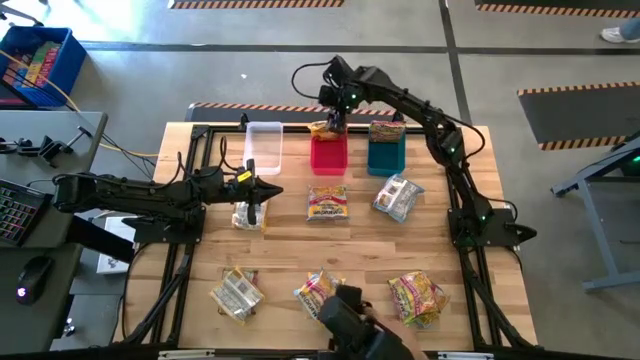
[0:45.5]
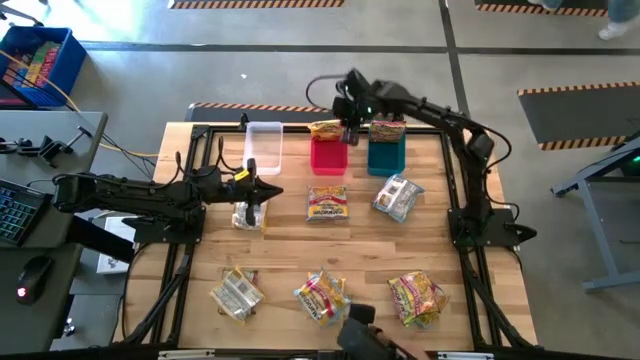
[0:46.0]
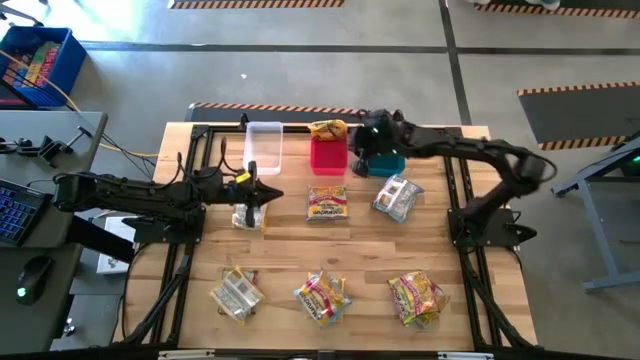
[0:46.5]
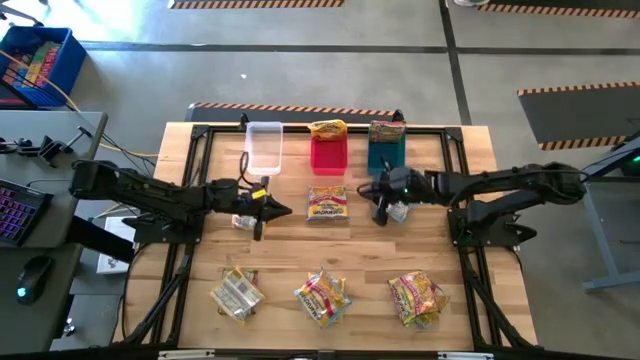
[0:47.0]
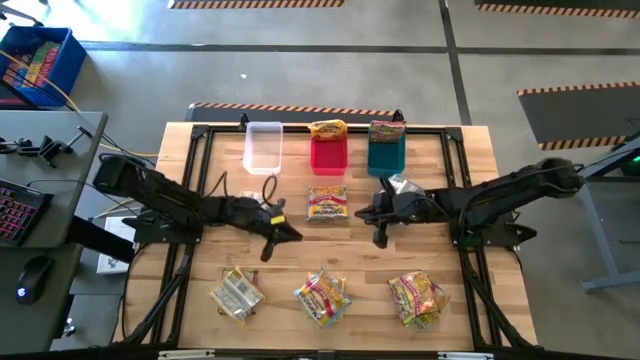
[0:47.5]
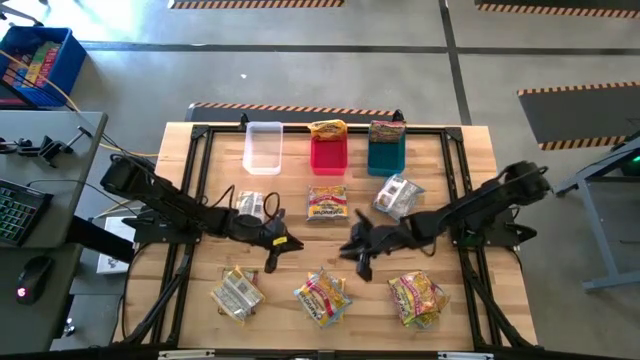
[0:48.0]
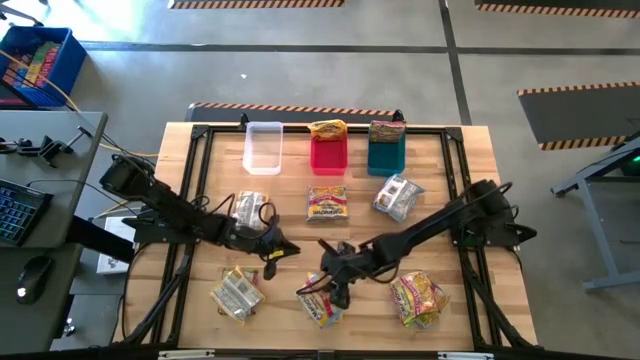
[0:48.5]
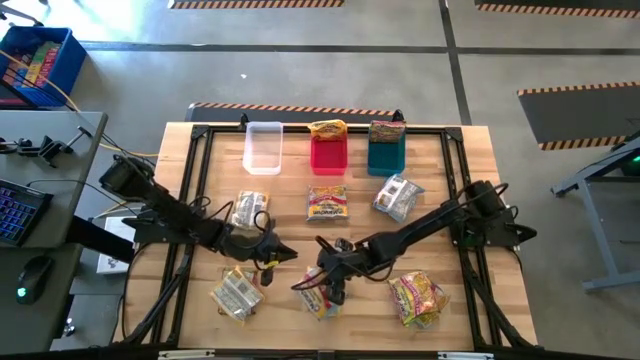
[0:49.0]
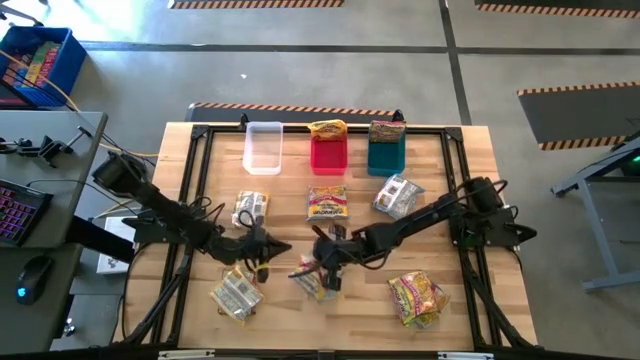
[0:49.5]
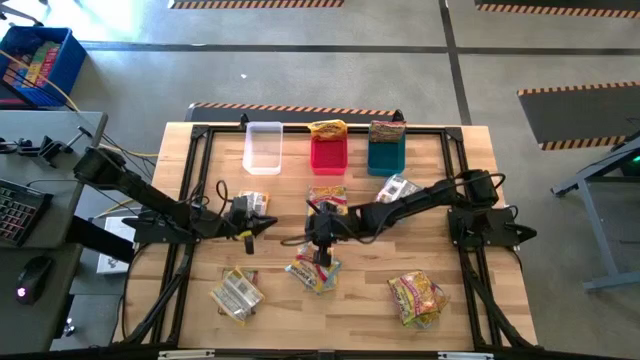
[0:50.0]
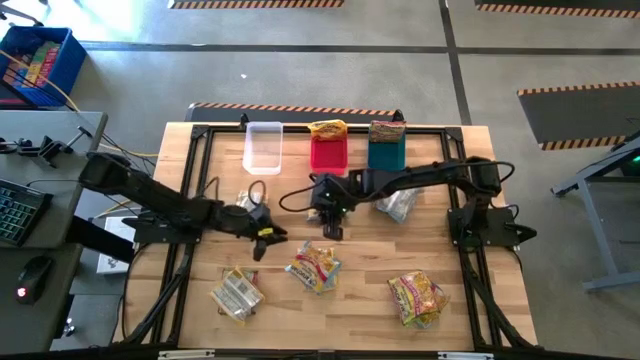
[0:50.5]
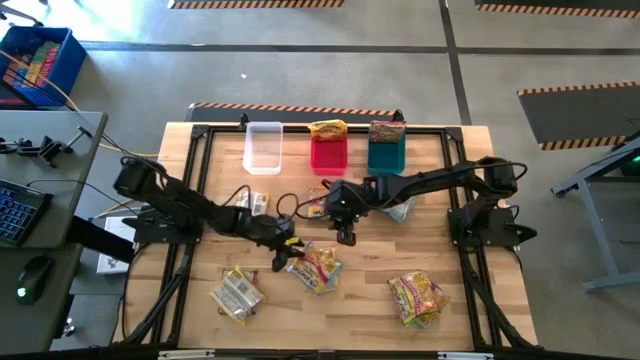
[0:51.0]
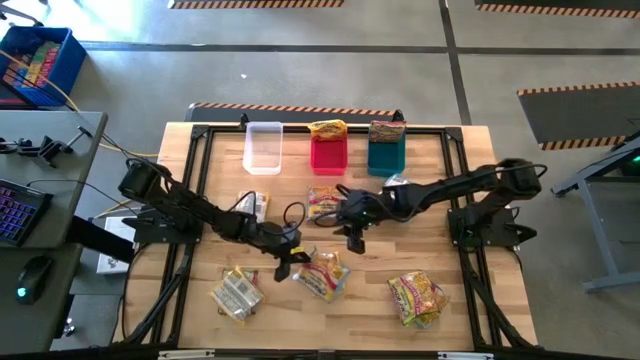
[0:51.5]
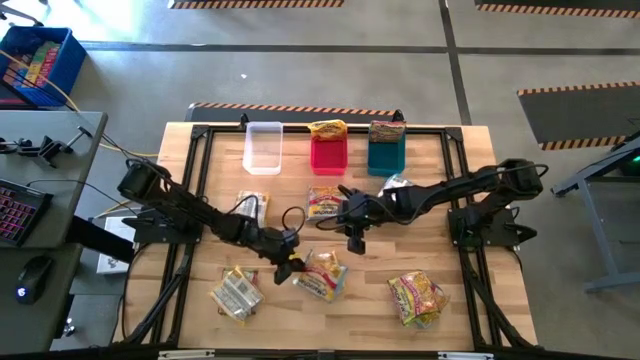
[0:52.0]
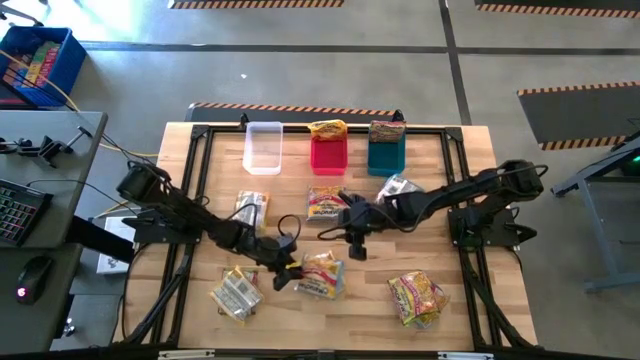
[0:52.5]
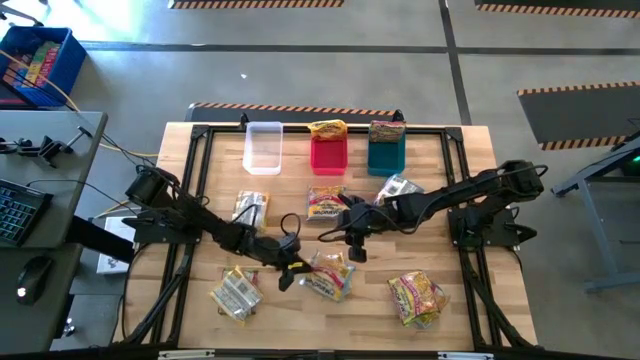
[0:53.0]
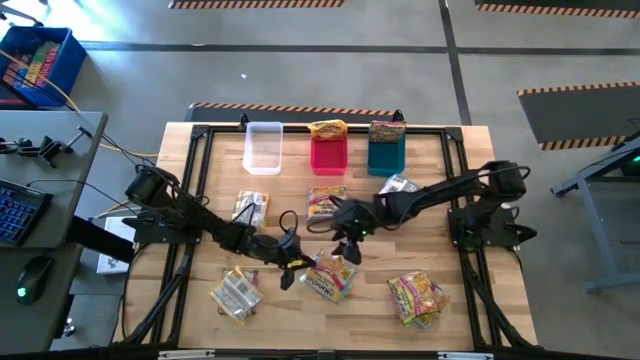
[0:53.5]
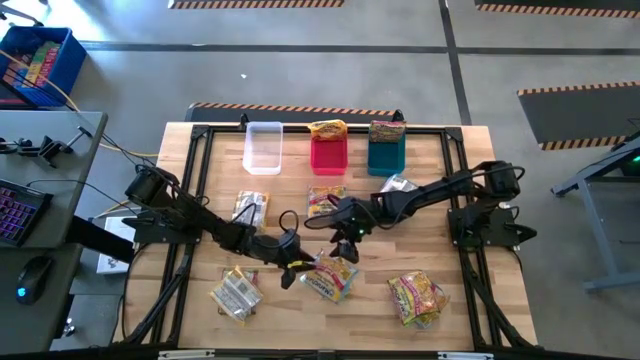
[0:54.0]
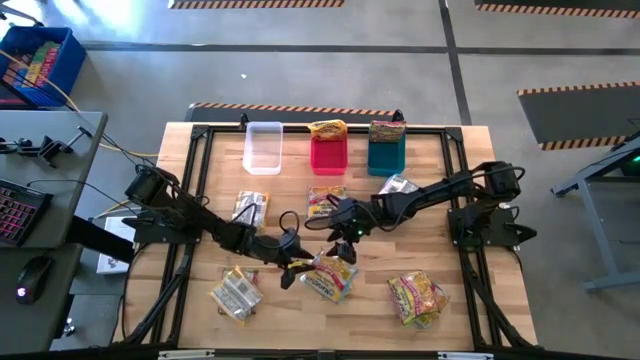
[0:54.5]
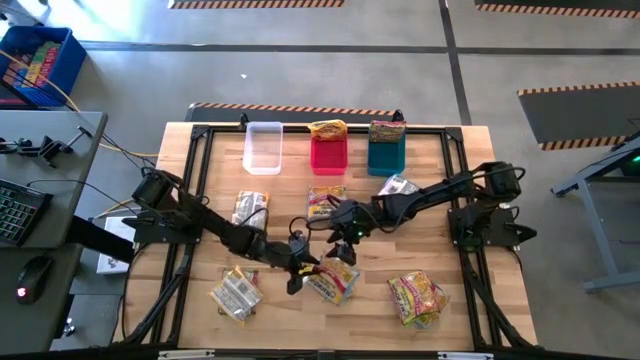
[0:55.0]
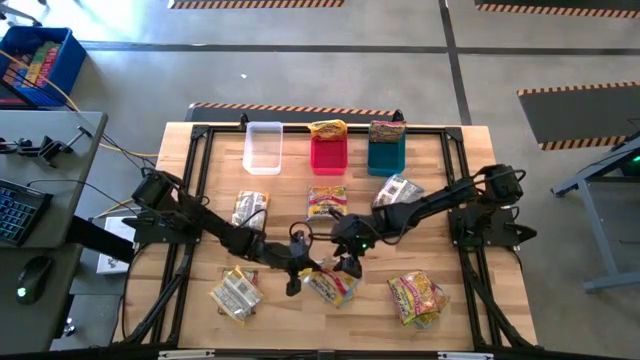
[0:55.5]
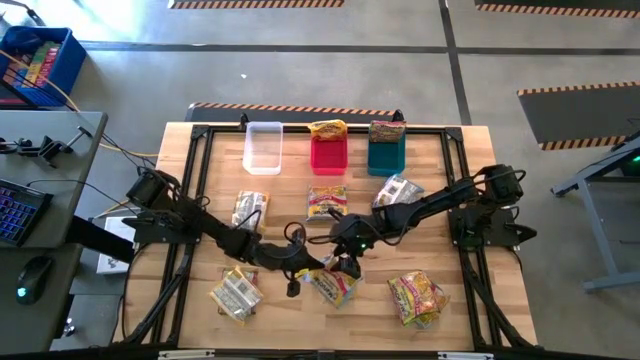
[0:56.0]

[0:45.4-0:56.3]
Task: Sort Maruchan noodles
Put the blue noodle pack into the transparent bin

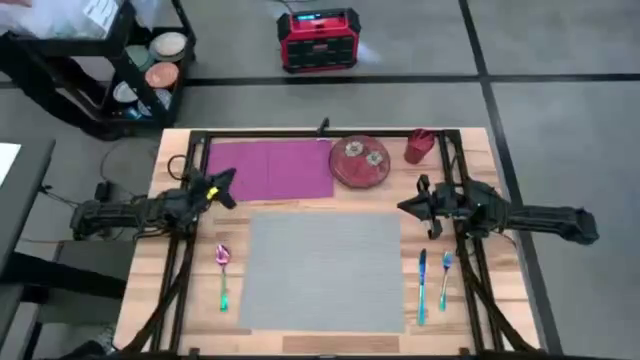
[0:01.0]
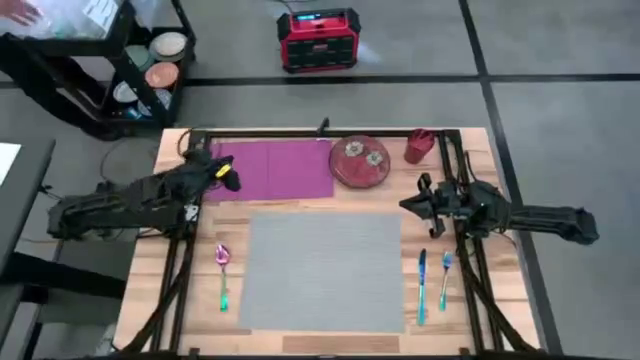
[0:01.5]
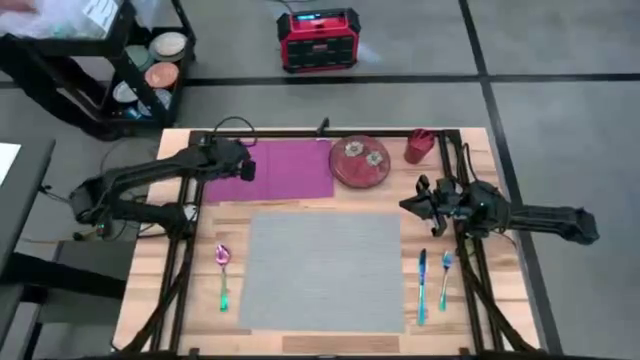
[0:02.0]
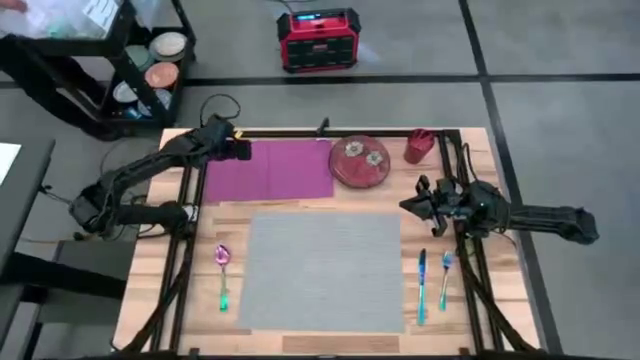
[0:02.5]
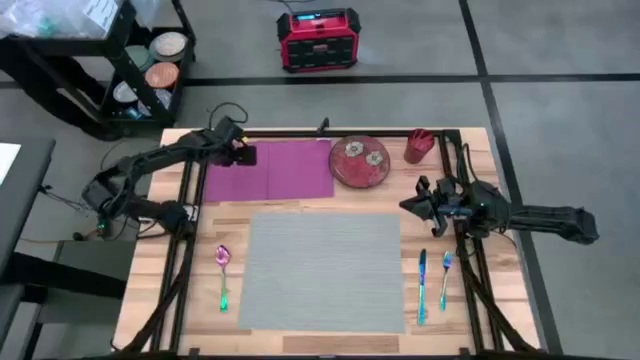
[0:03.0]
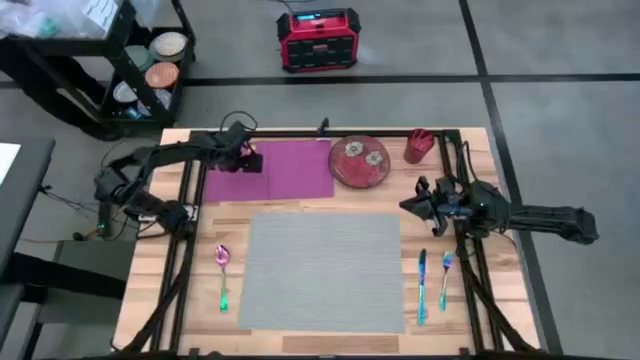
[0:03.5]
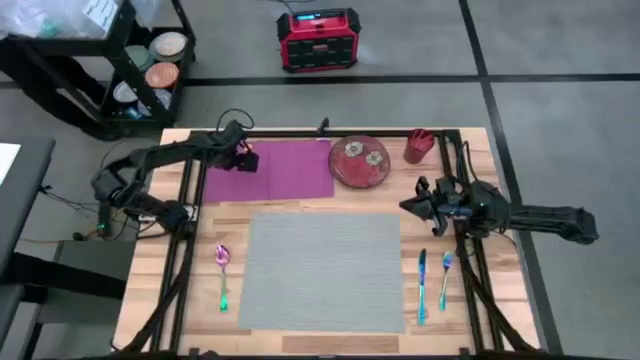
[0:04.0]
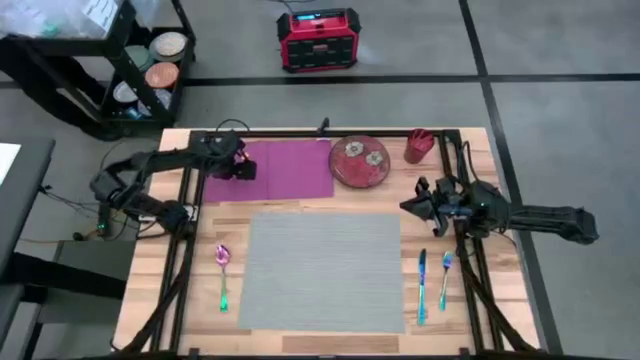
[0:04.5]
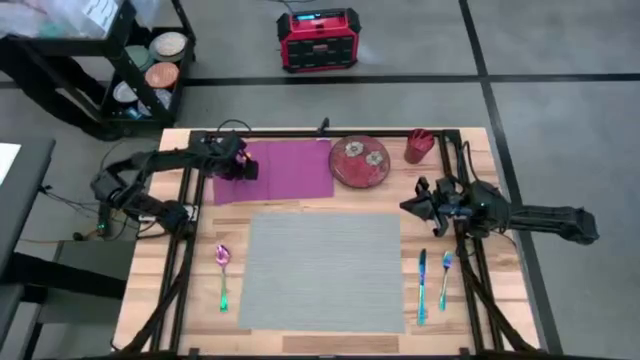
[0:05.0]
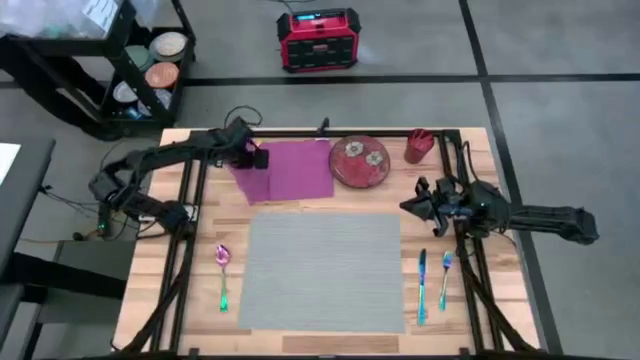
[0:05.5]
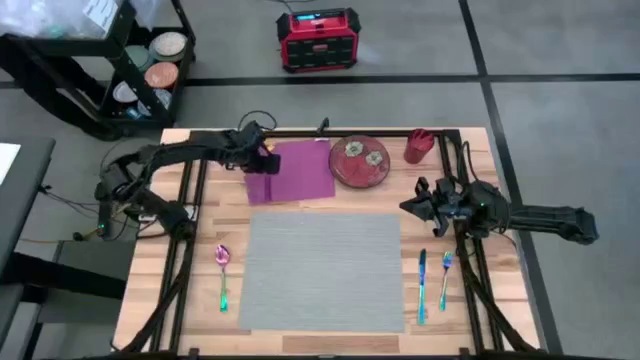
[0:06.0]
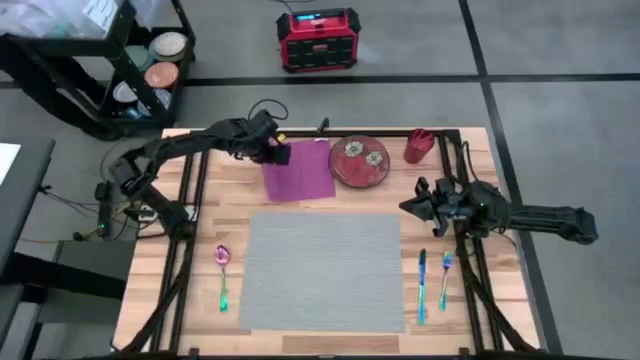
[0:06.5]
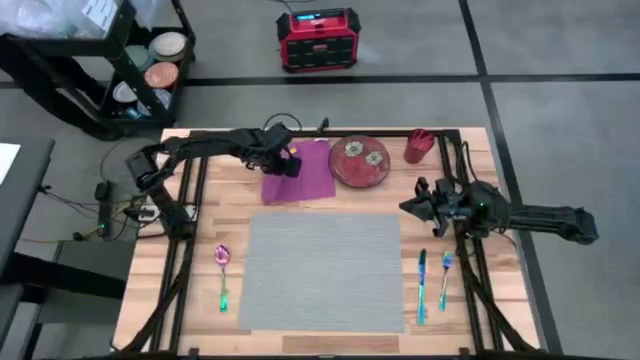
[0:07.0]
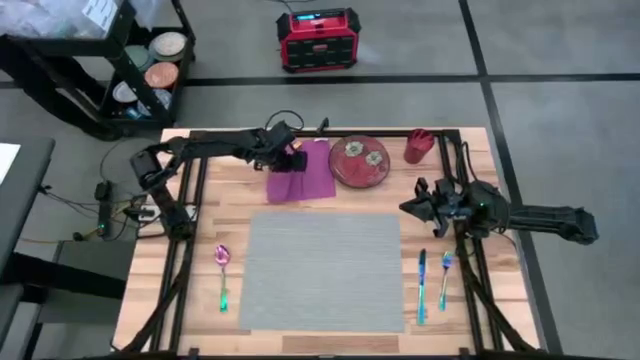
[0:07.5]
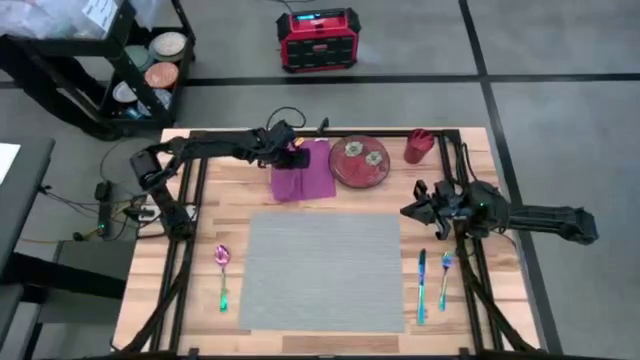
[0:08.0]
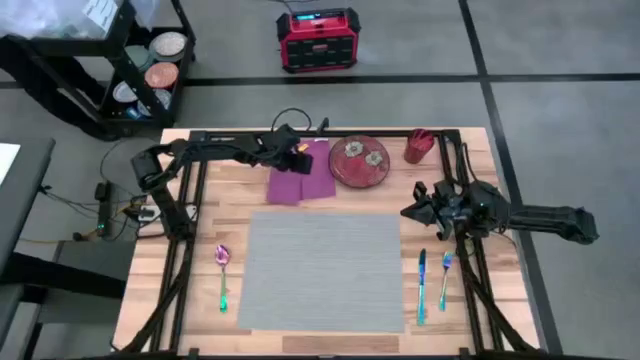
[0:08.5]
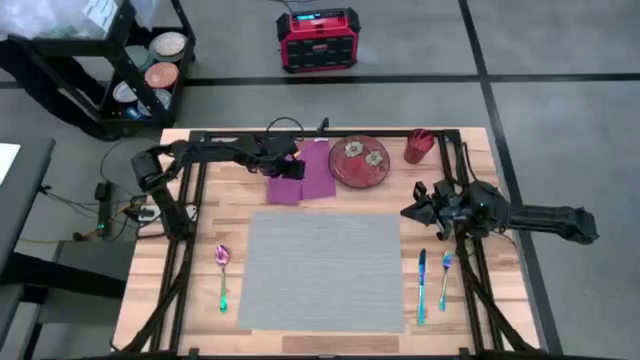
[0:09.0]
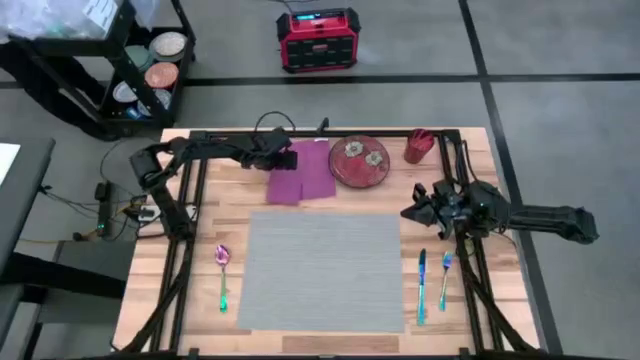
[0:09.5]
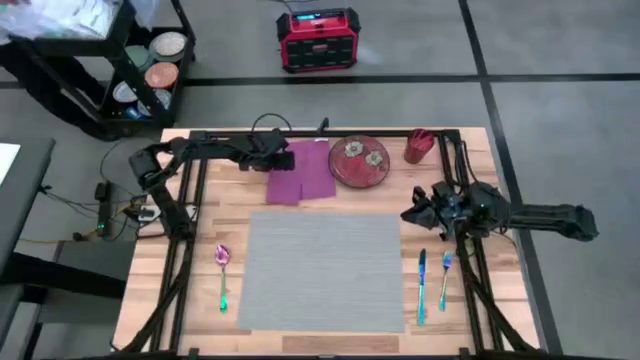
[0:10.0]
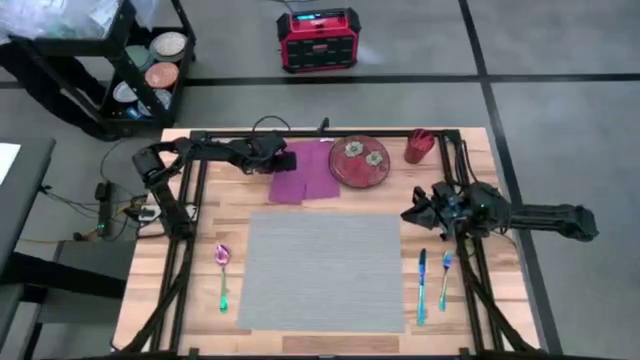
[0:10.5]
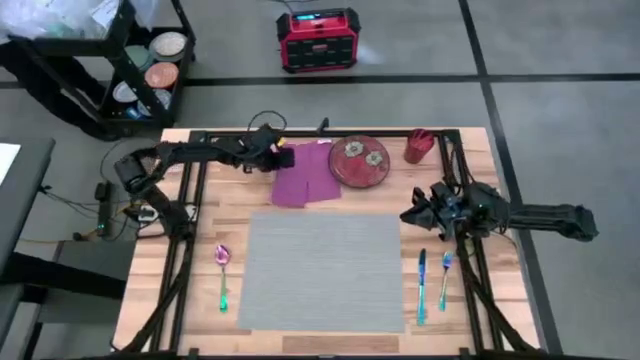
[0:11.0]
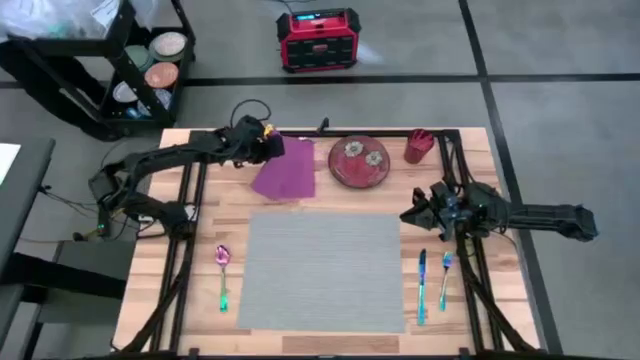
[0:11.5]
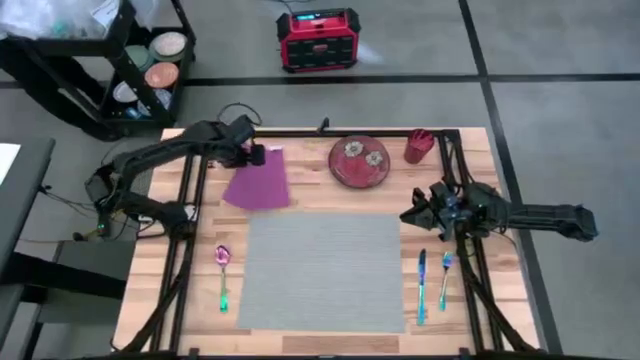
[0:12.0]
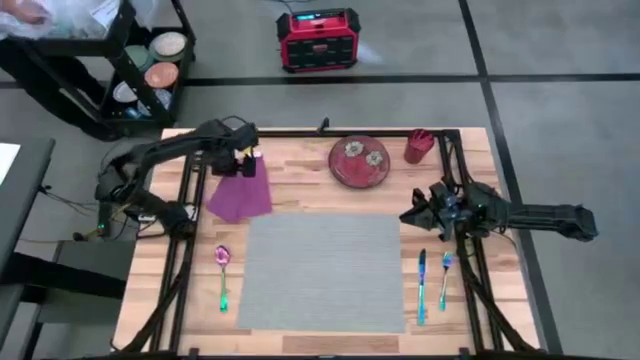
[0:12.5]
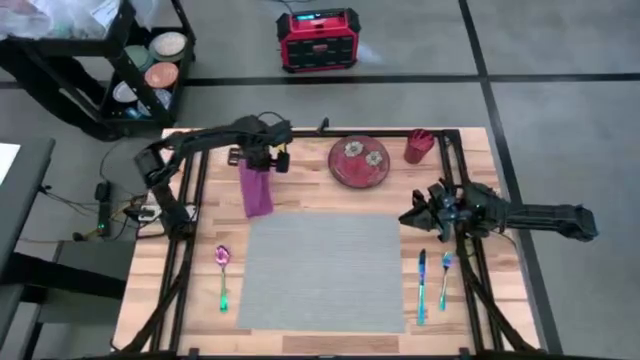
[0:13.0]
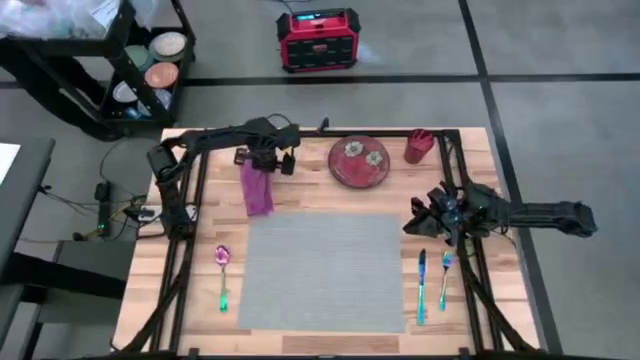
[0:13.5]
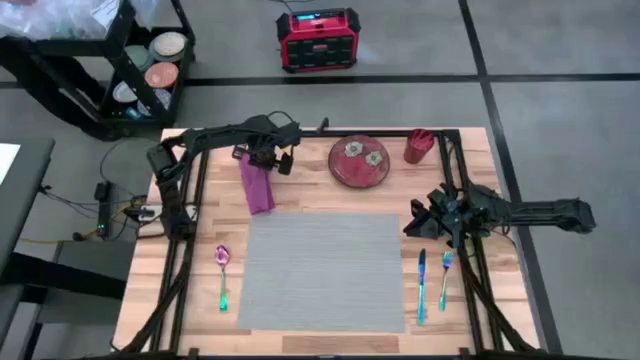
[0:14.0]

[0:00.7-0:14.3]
Task: Set table place
Fold the violet table napkin
